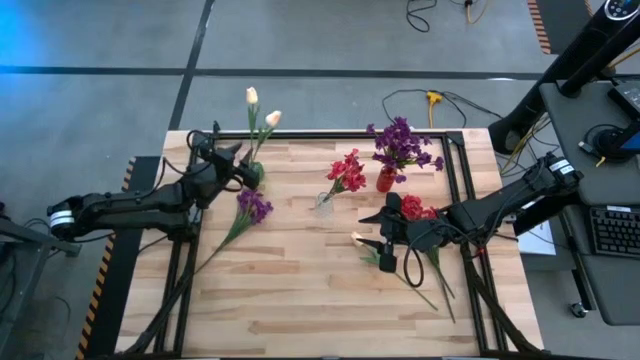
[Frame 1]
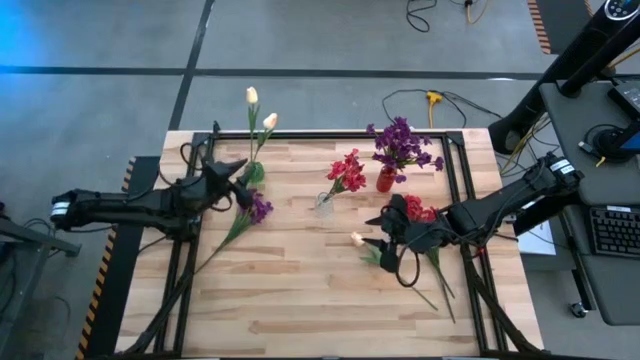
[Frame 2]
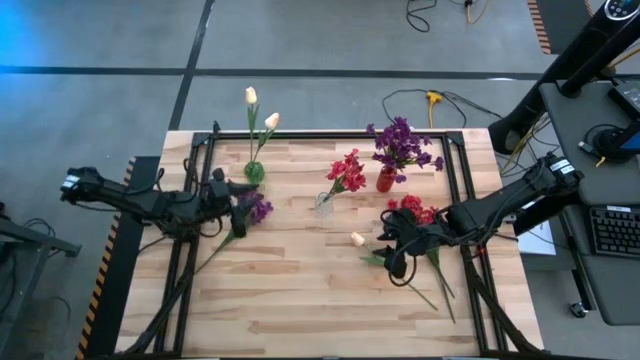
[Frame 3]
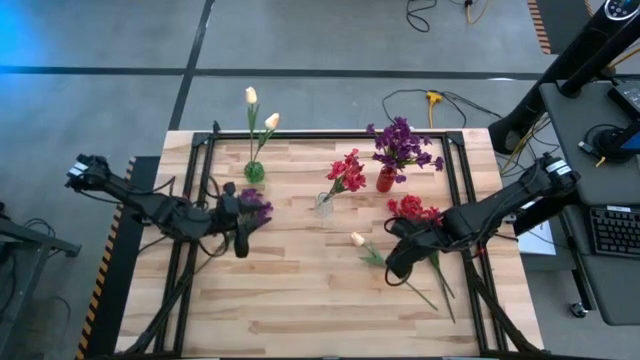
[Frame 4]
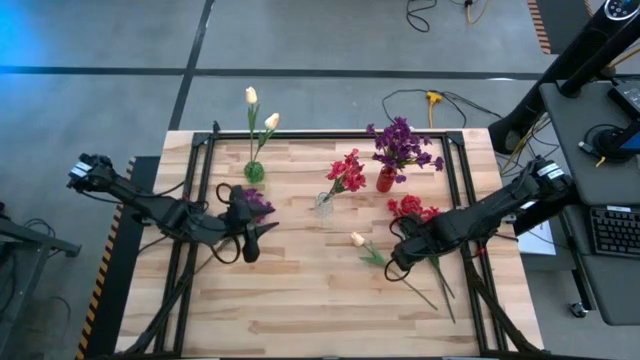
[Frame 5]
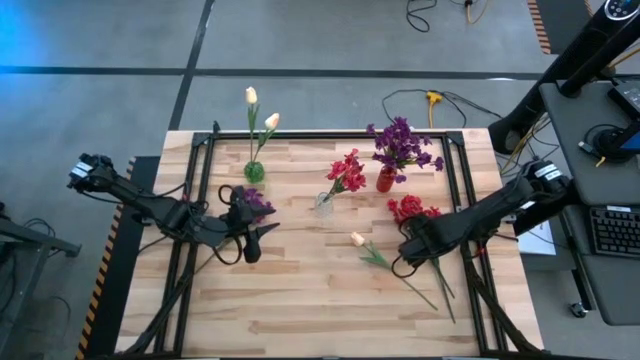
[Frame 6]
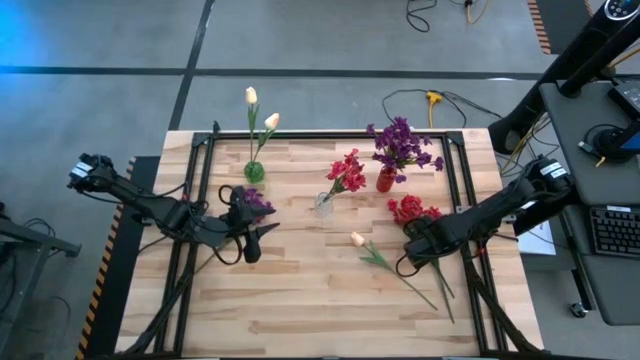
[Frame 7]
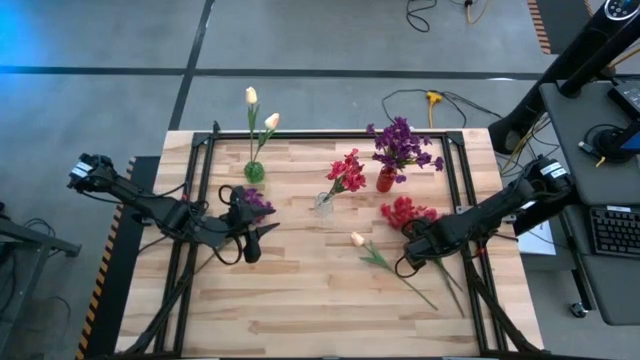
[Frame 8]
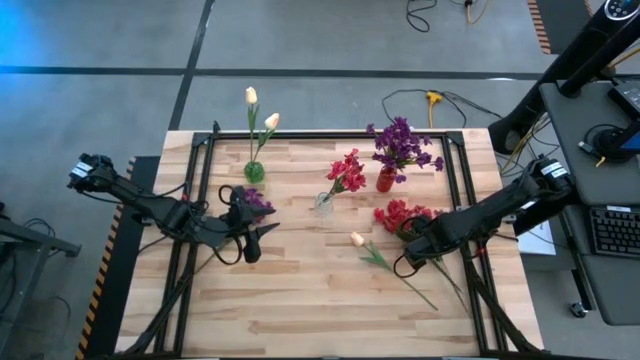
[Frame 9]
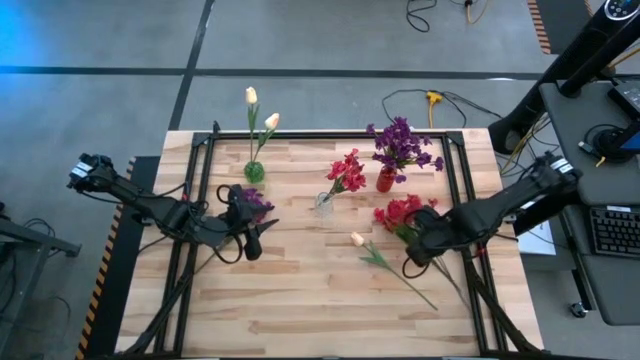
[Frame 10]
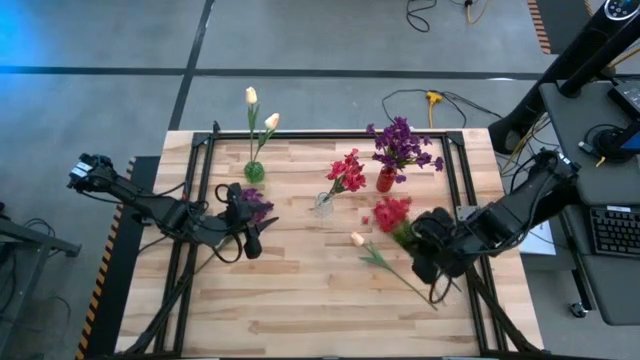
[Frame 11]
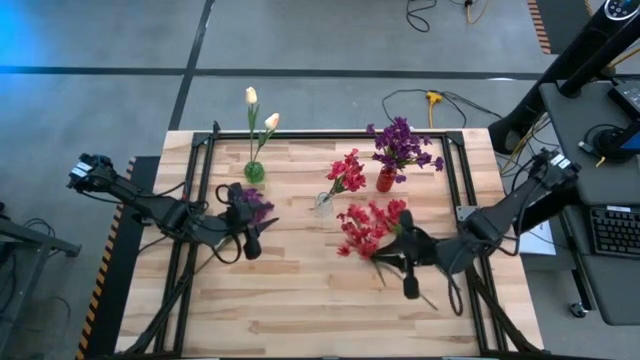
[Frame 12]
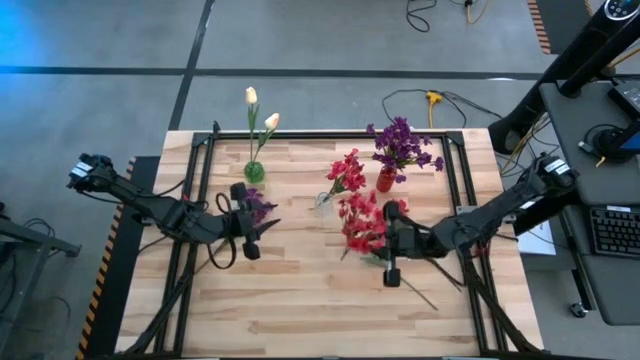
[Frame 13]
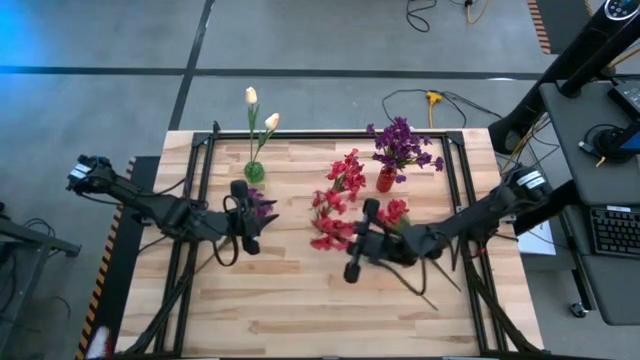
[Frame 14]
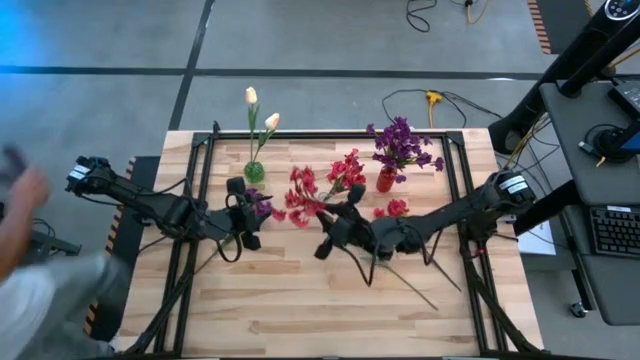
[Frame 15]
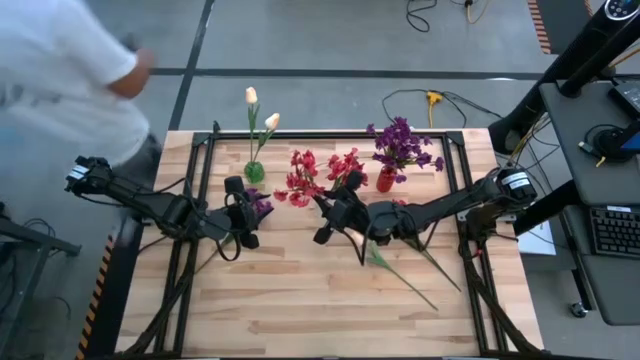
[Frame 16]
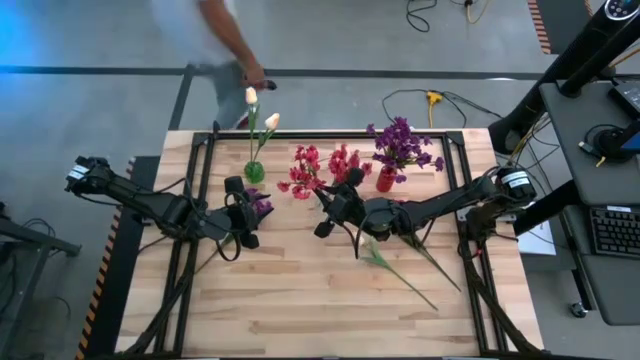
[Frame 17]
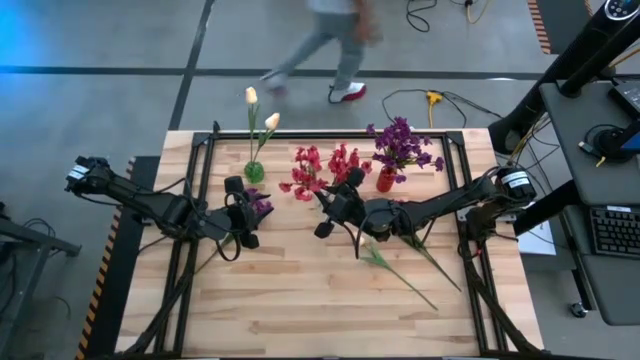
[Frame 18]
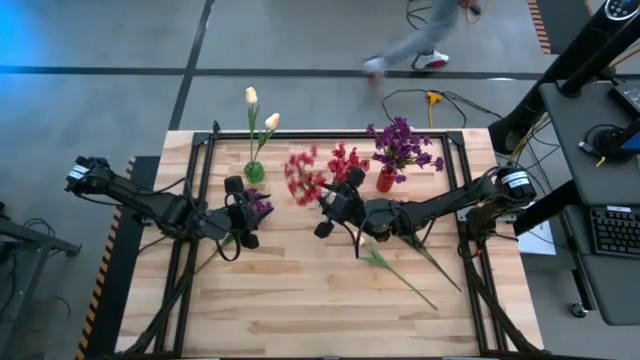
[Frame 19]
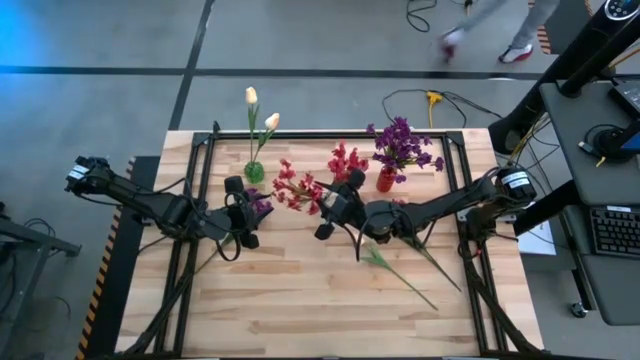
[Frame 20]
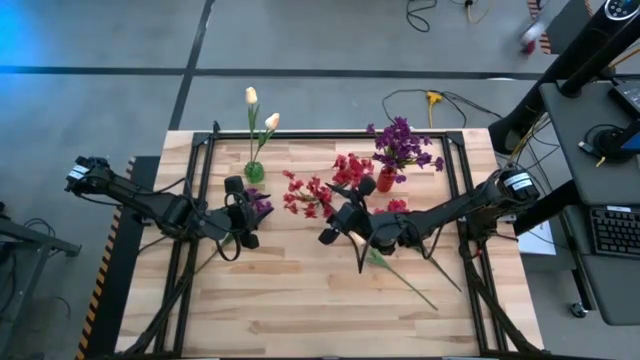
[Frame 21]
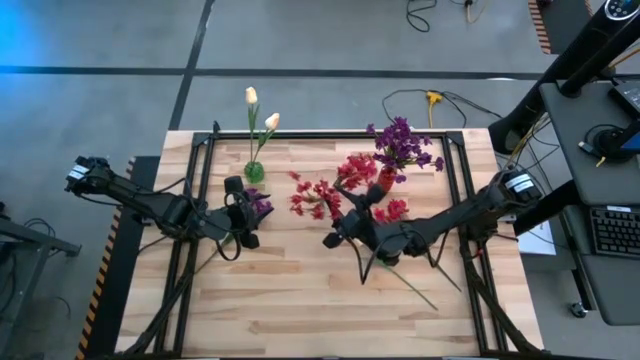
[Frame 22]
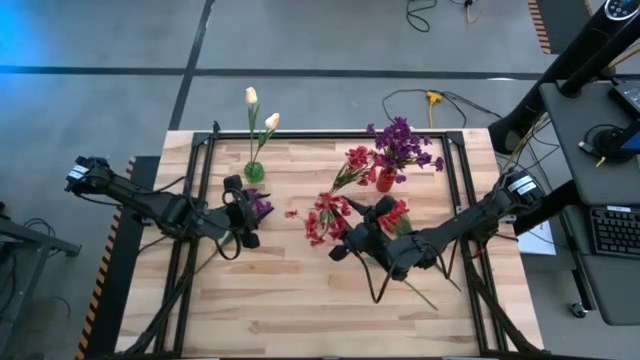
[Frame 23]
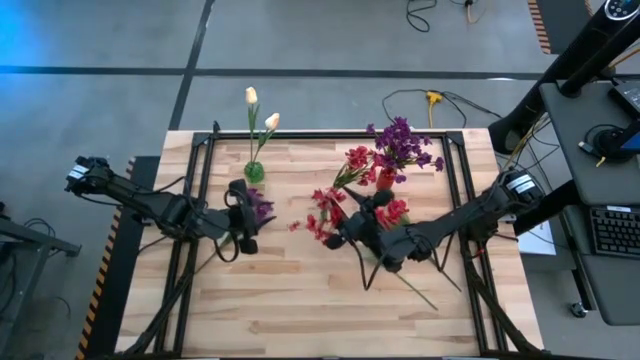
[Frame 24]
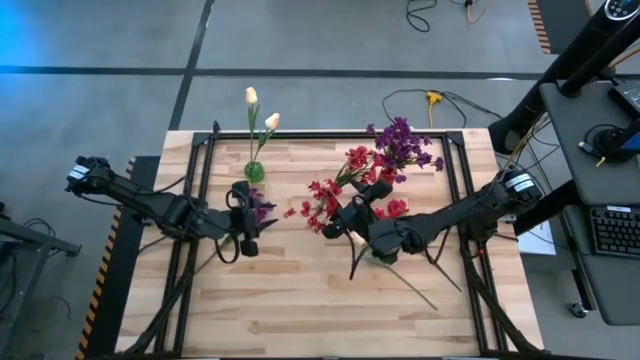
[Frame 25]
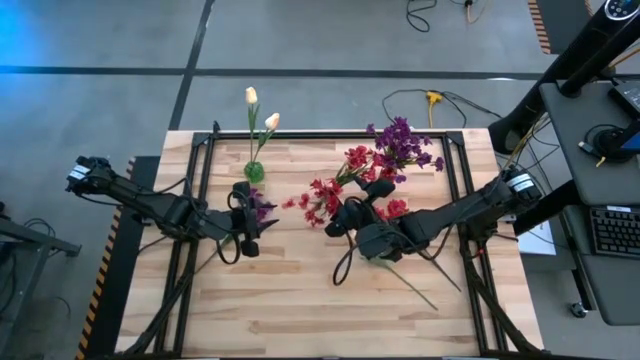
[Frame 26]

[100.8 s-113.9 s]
Task: Sort flowers into vase by color
Put the right red flowers into the transparent vase

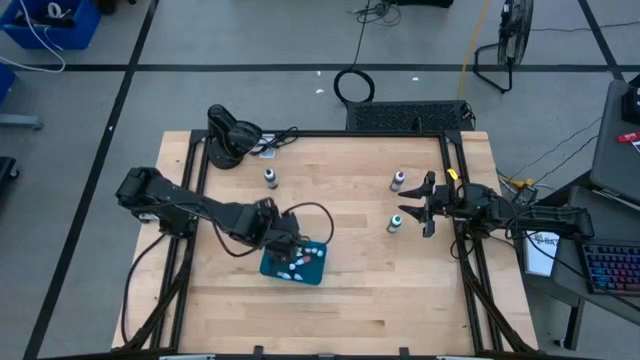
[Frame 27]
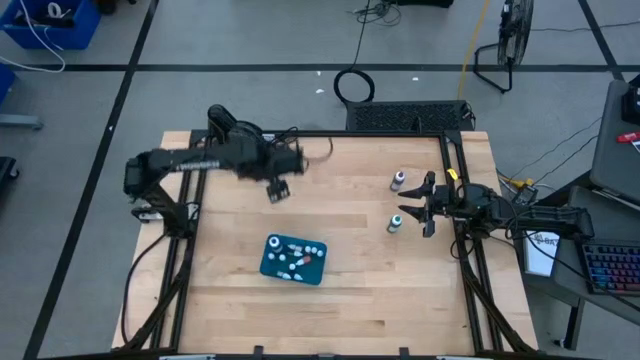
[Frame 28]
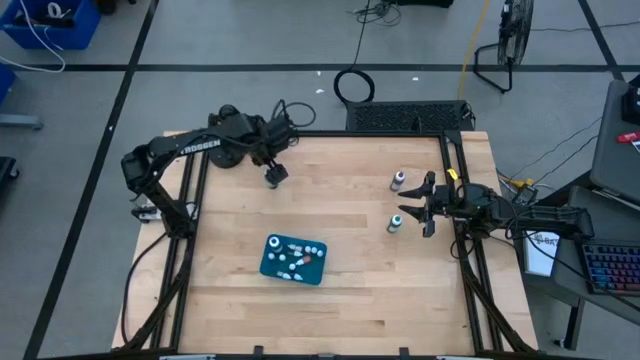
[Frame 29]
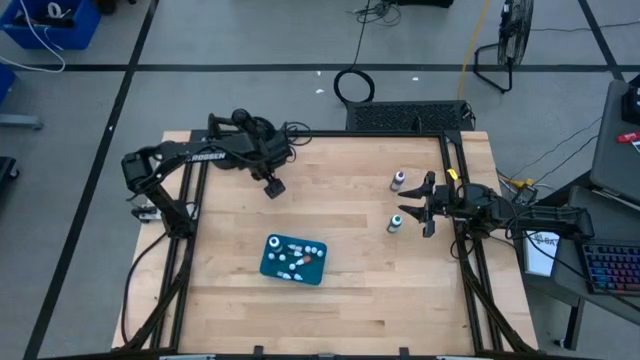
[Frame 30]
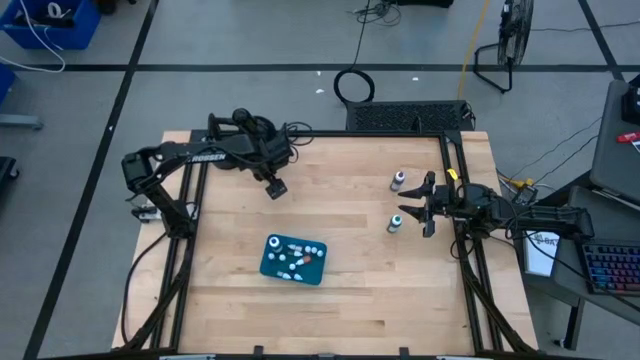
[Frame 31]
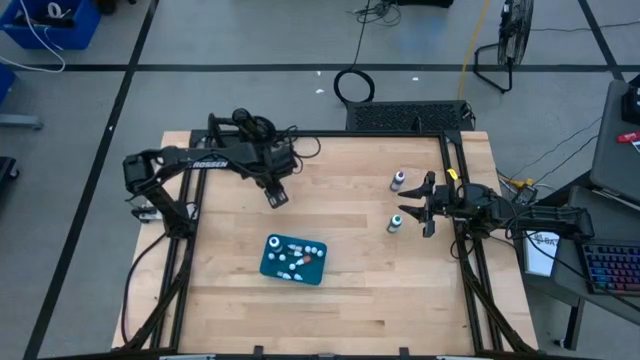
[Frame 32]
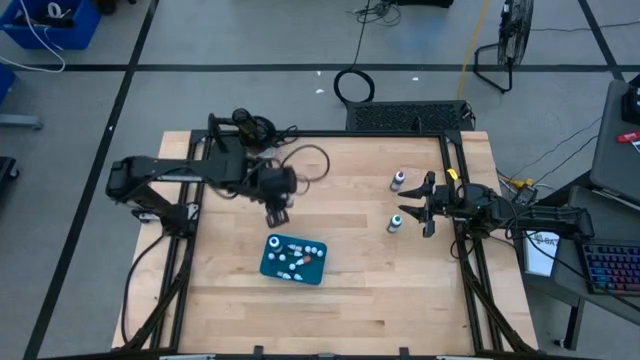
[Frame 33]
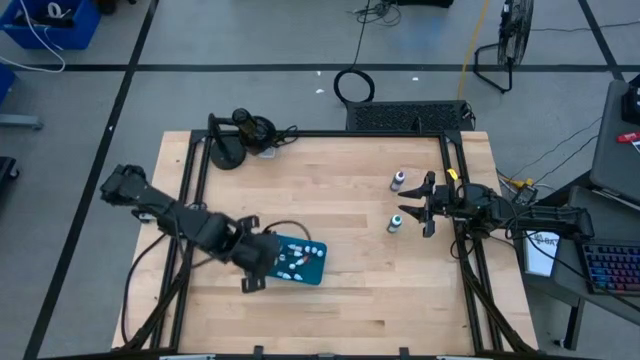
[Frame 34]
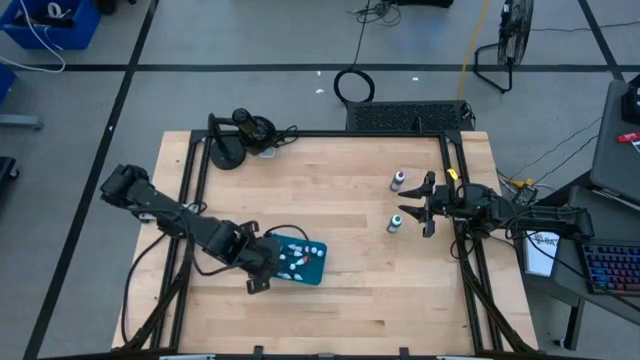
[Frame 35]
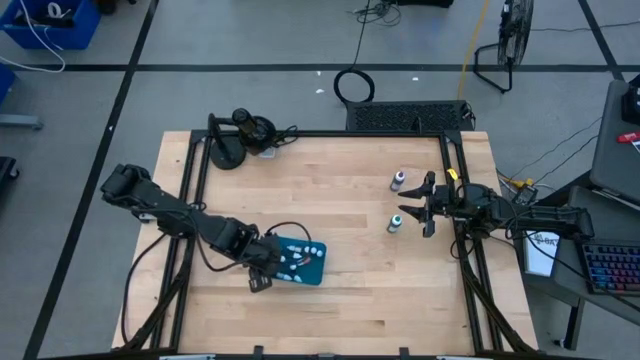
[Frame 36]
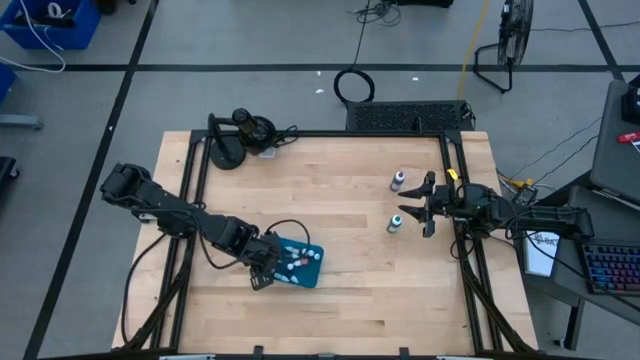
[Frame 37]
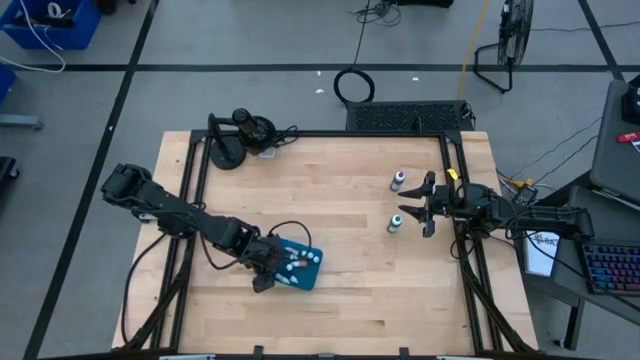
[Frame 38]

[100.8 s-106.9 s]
Task: Pick & Place food coloring
Put the large black coloring bottle into the blue bin

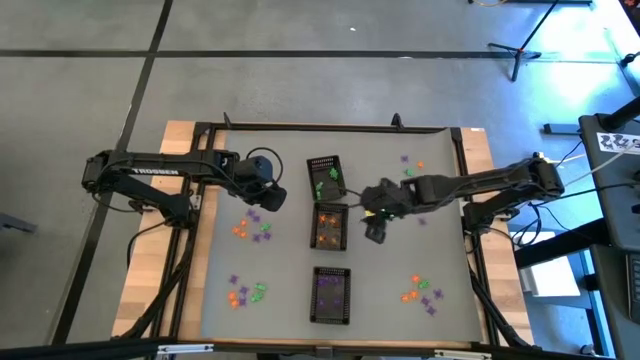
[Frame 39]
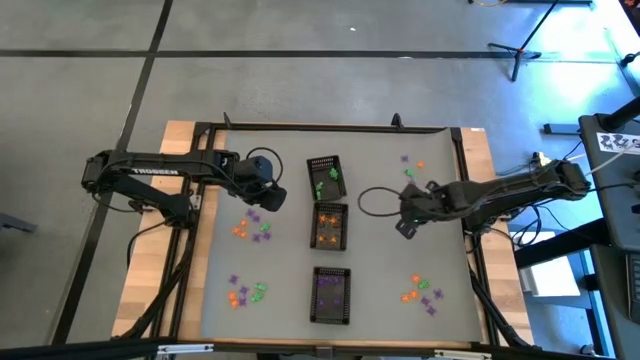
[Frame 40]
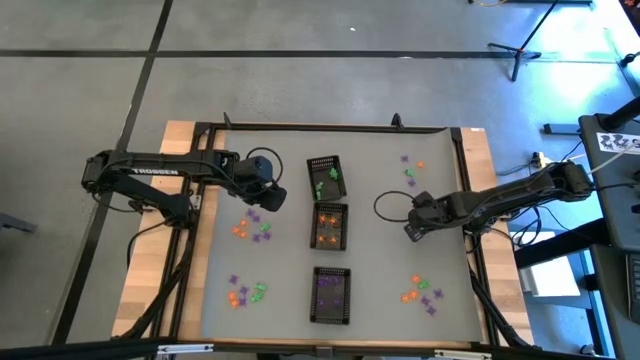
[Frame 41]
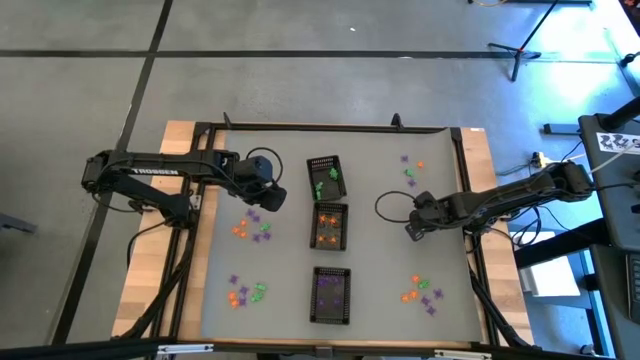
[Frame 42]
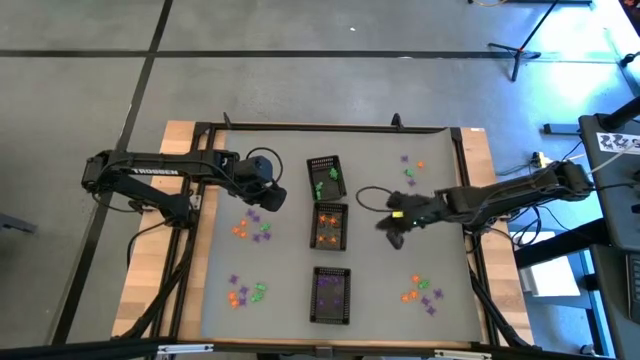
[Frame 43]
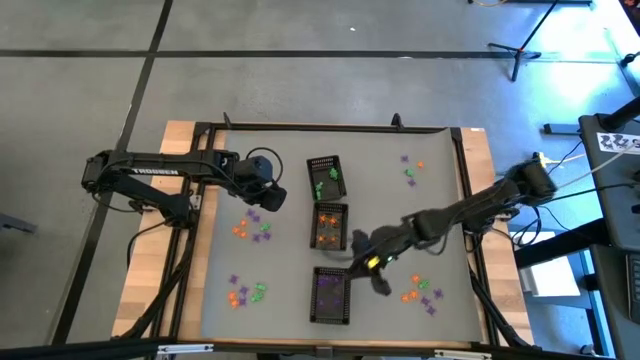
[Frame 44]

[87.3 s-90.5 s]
Task: Sort Halloween decoration
Put the violet spider toy into the bottom black bin
